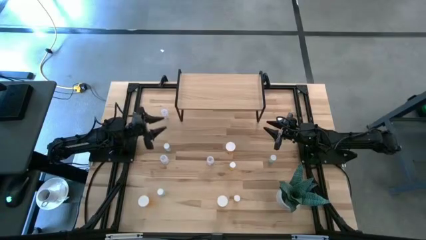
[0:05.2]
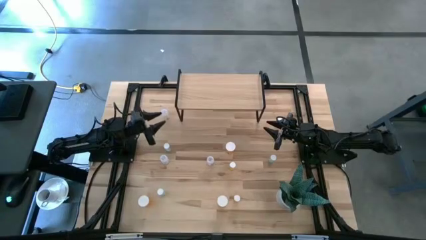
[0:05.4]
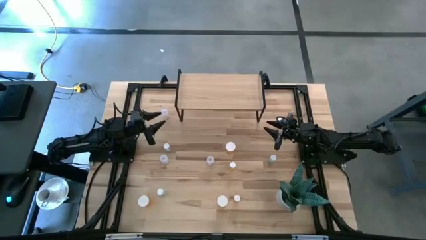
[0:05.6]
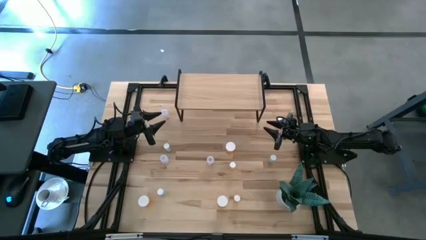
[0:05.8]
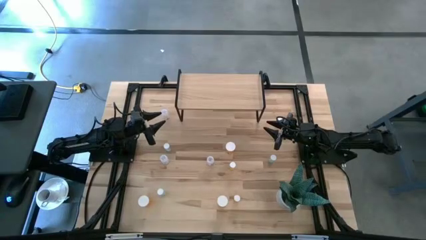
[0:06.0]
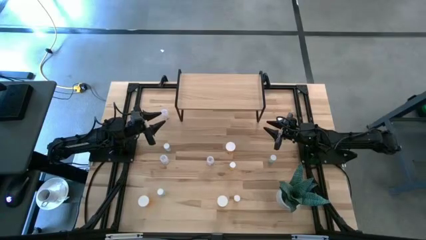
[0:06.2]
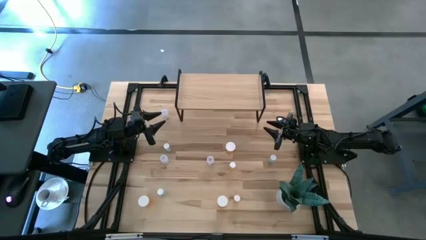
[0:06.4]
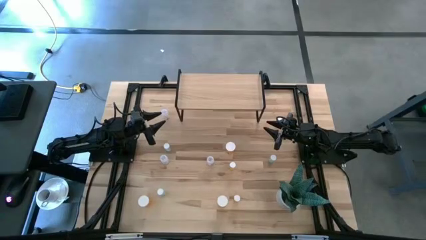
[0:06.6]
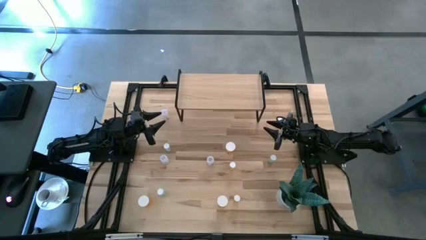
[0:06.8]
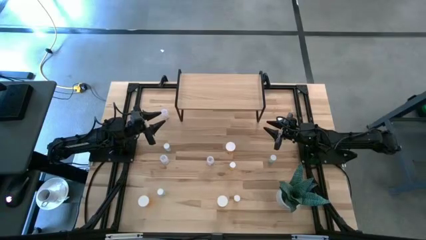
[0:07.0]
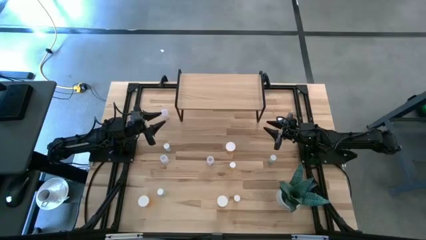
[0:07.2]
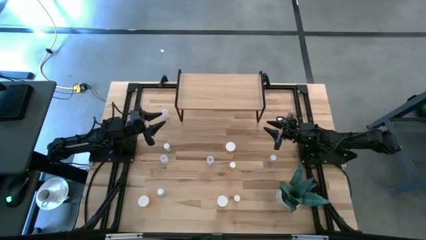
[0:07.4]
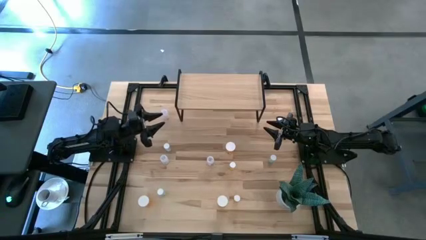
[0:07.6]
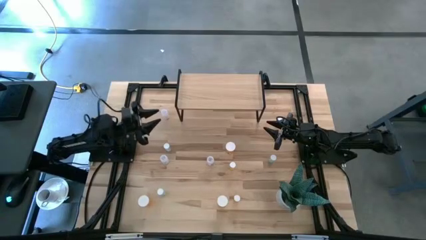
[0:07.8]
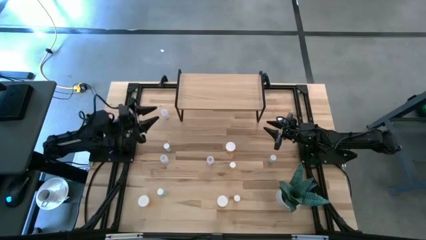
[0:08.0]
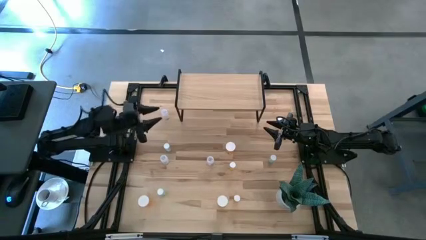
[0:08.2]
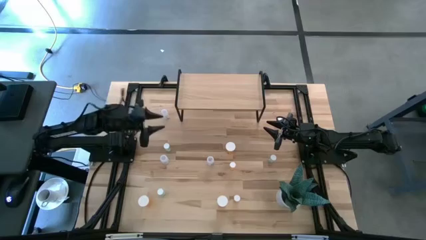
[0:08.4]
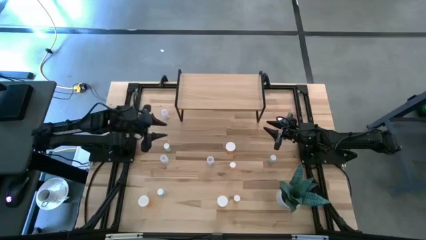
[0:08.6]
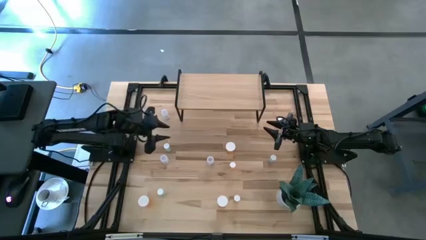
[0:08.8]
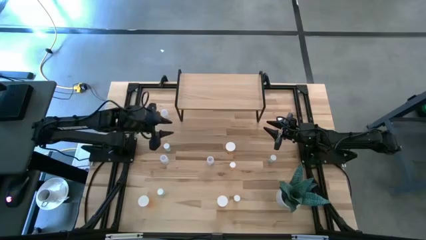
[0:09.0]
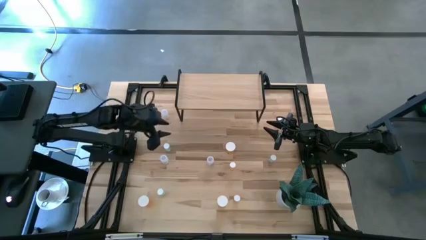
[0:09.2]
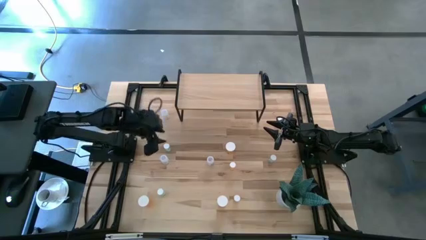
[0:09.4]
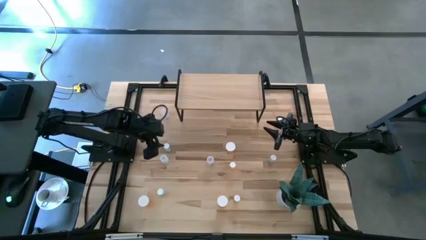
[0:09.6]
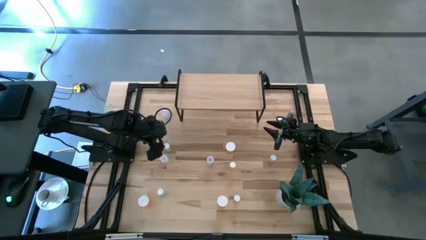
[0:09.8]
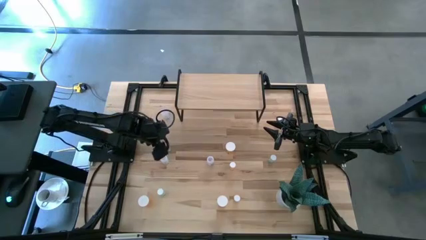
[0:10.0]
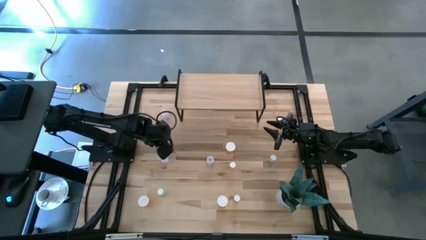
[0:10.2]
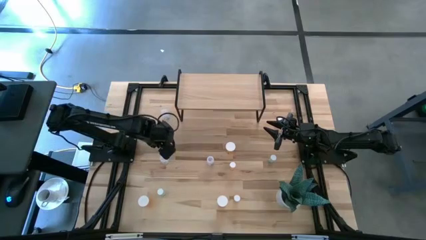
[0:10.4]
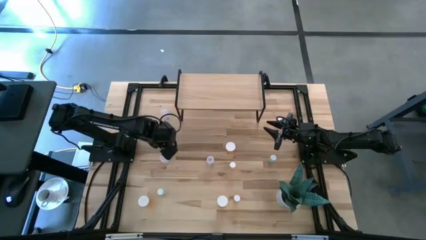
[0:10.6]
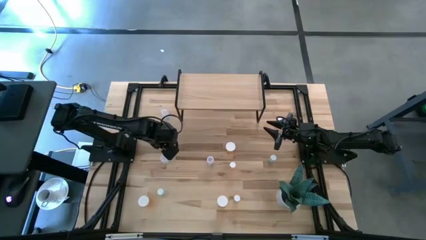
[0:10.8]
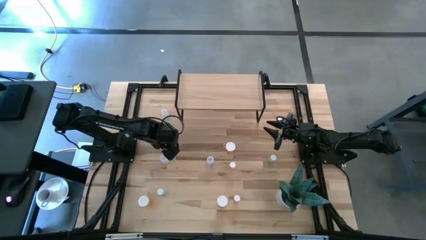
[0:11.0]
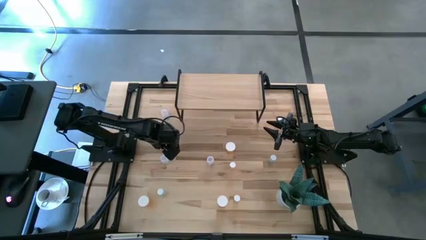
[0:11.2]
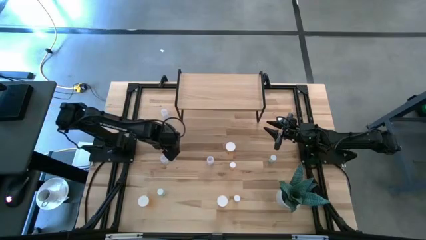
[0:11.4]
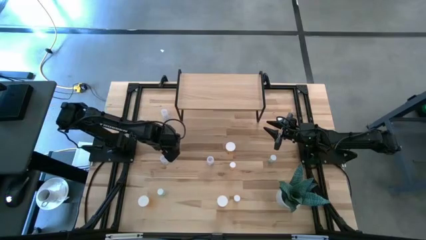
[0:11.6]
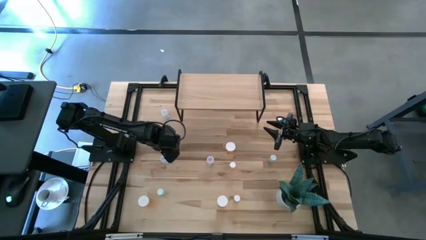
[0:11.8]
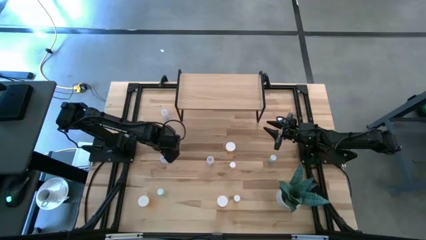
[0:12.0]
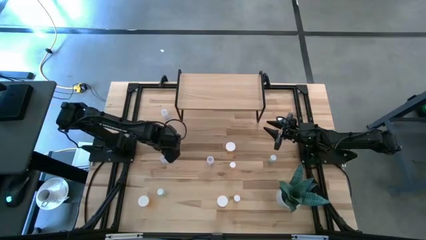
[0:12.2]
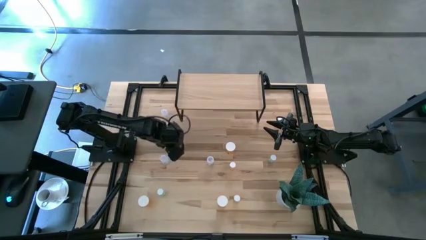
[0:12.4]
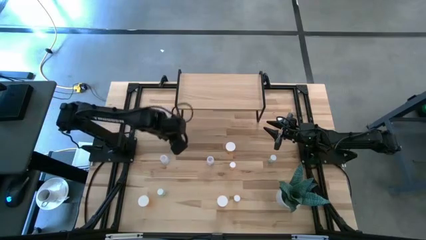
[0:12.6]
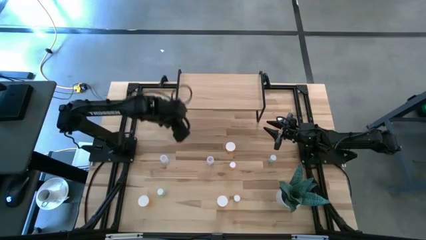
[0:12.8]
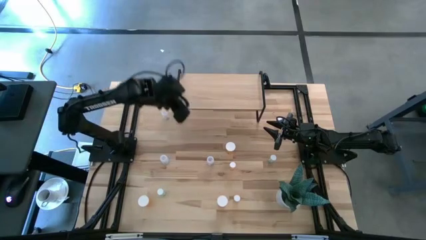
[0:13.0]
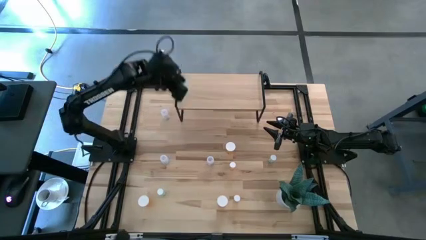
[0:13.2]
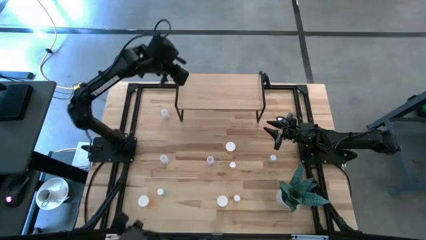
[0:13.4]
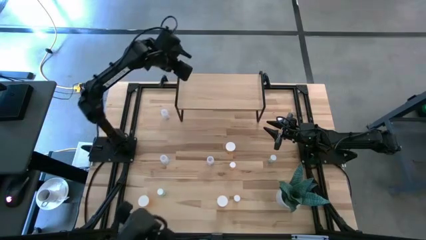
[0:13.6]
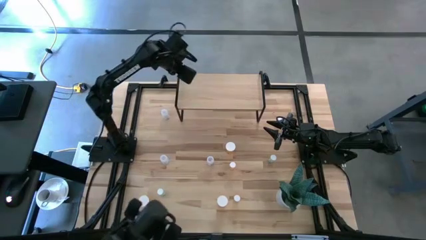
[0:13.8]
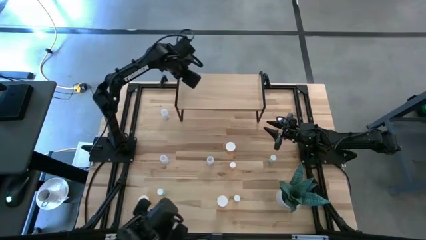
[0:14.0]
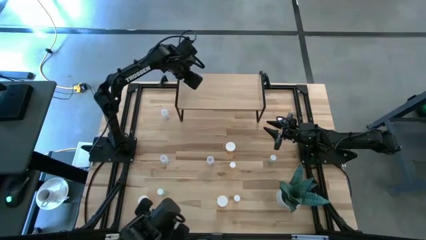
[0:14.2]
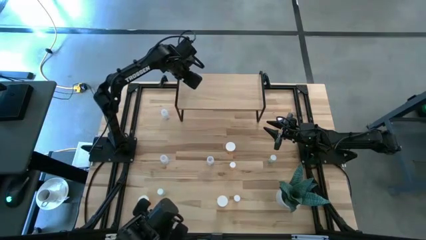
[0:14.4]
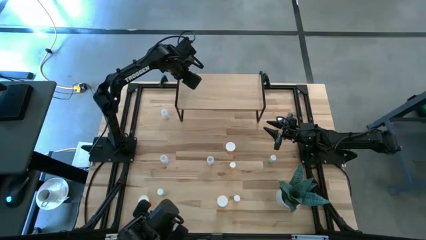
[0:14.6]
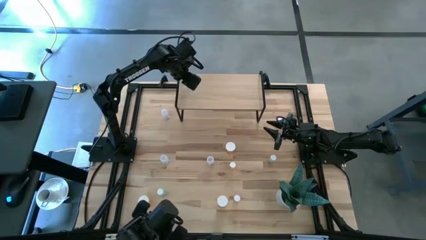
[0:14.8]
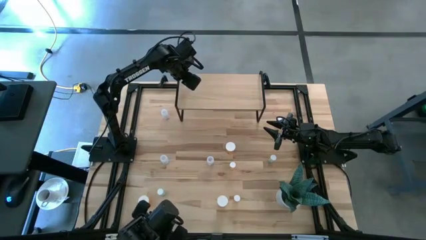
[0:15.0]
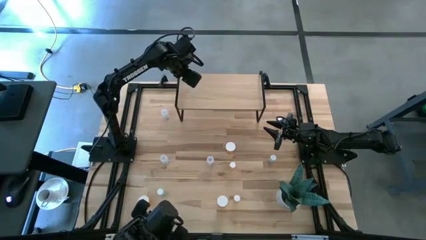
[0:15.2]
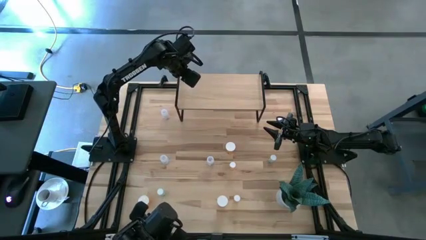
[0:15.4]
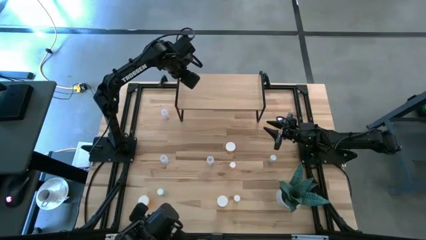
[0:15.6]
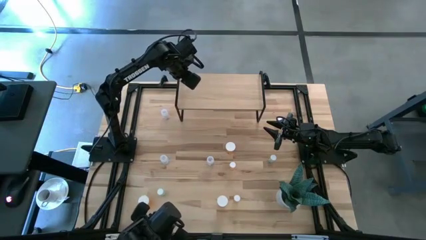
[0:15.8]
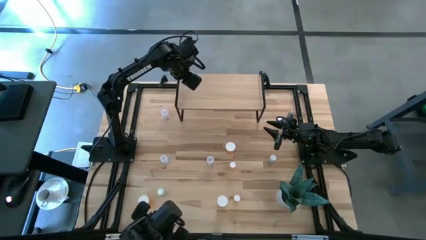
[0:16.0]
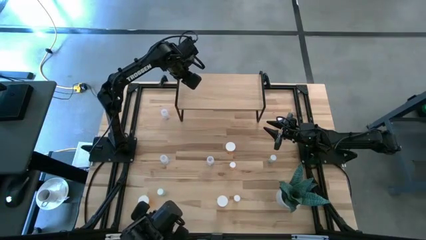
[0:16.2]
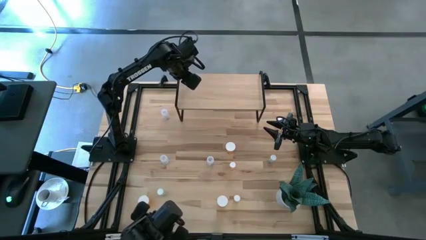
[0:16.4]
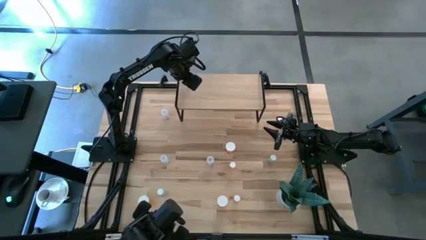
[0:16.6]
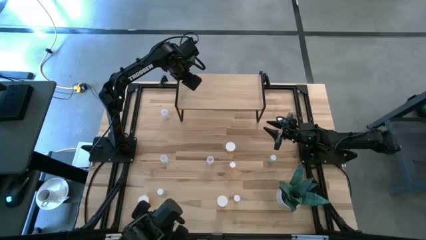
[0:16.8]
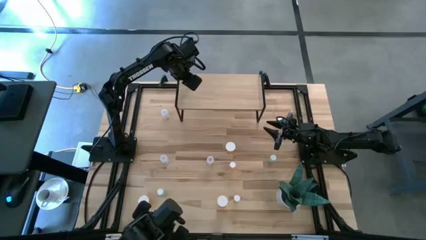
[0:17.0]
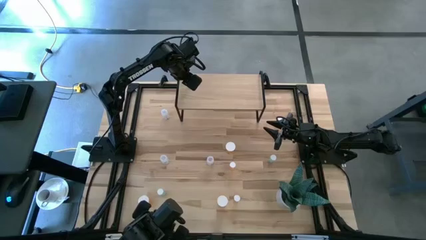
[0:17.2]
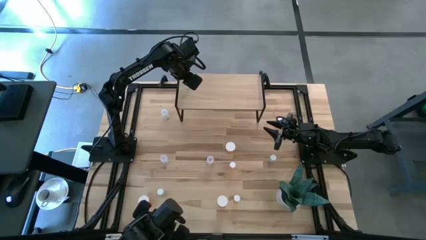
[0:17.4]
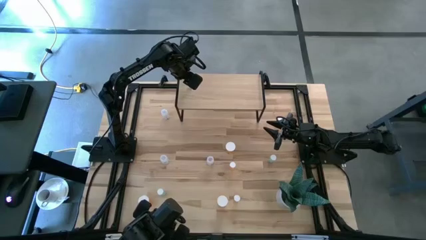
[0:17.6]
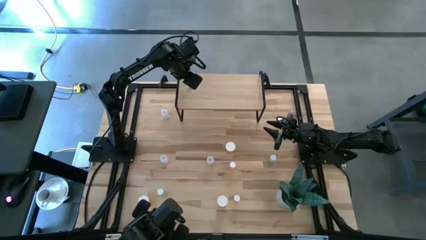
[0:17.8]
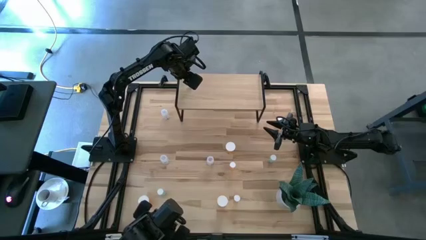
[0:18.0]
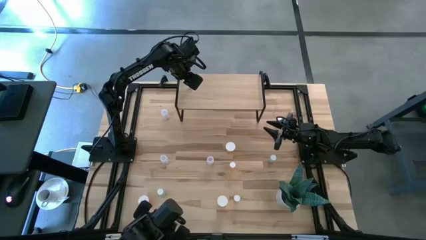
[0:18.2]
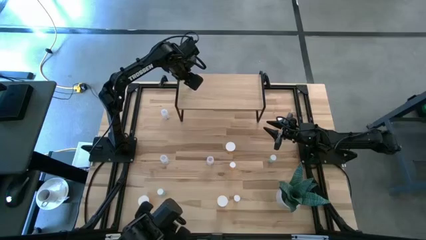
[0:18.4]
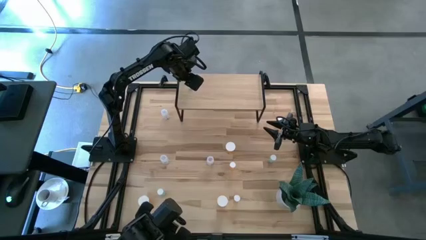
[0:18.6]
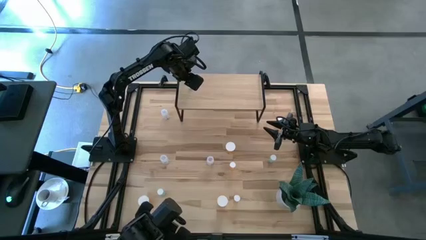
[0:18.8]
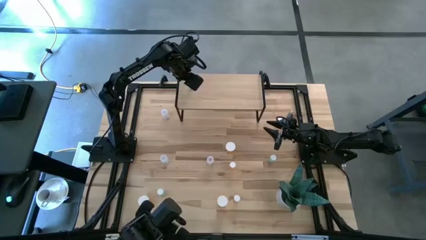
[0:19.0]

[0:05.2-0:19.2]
Task: Pick and place medicine bottles onto shelf by color
Put the top left blue pill bottle on the shelf

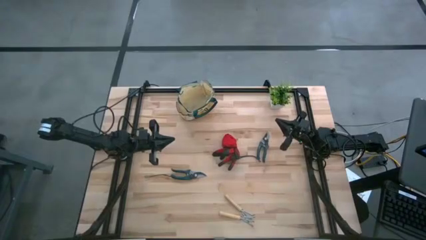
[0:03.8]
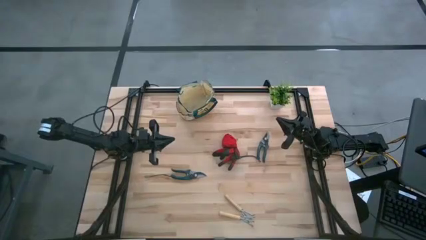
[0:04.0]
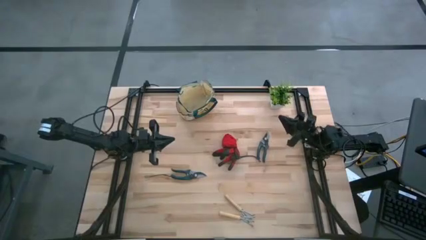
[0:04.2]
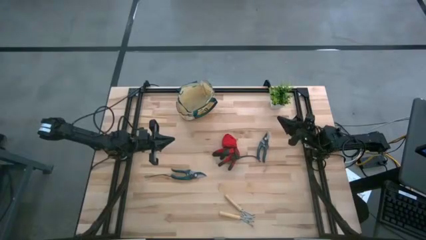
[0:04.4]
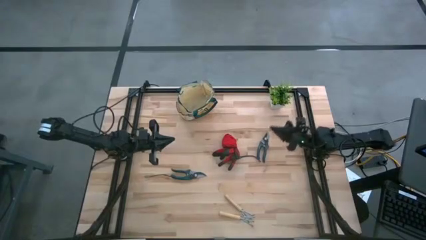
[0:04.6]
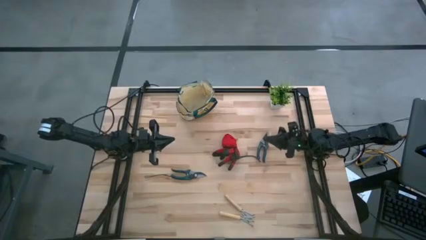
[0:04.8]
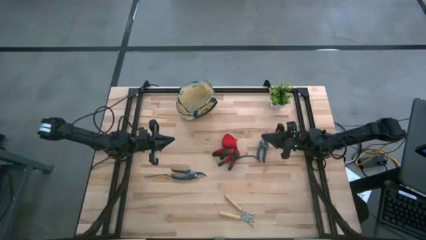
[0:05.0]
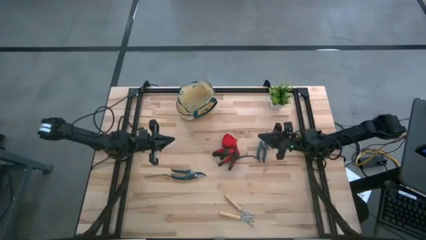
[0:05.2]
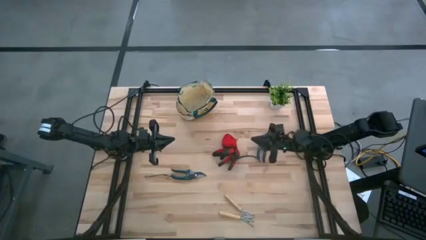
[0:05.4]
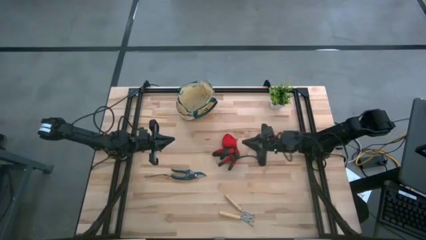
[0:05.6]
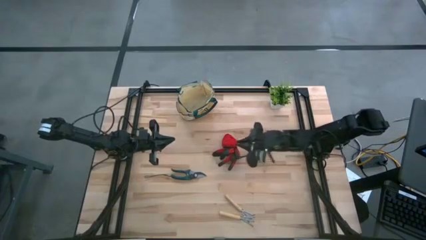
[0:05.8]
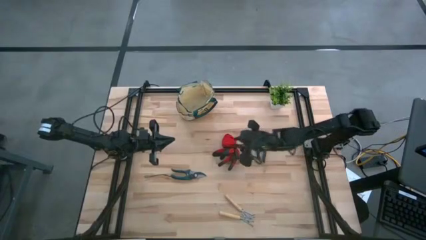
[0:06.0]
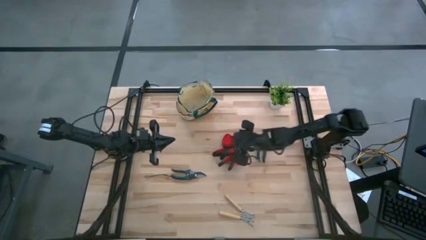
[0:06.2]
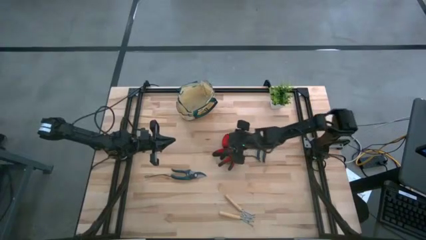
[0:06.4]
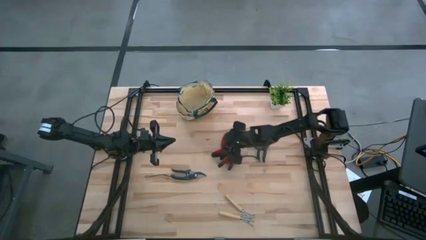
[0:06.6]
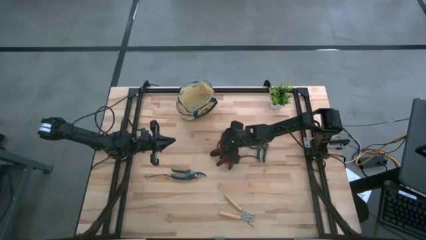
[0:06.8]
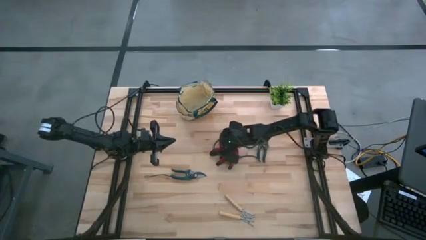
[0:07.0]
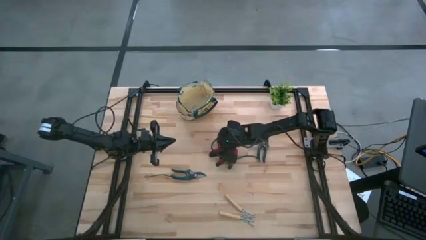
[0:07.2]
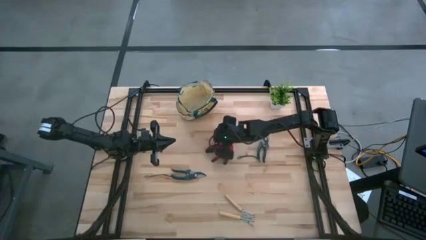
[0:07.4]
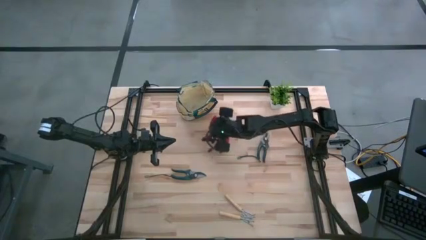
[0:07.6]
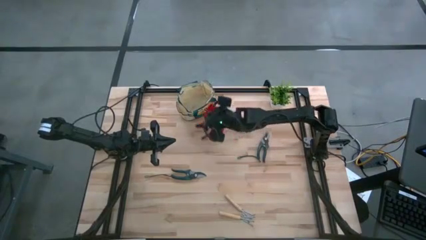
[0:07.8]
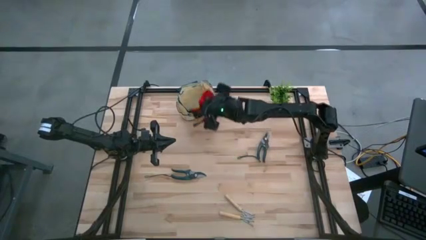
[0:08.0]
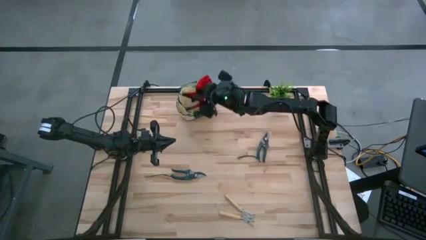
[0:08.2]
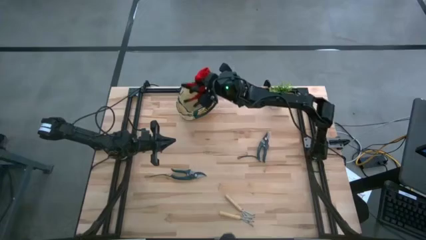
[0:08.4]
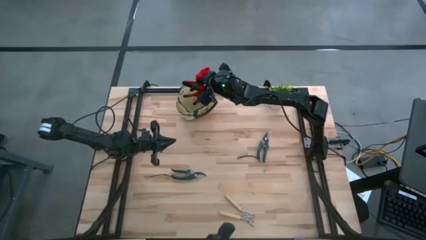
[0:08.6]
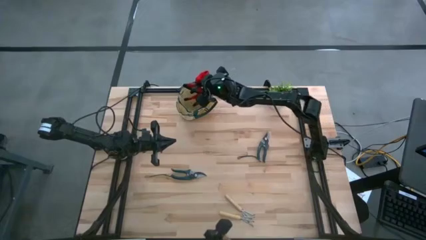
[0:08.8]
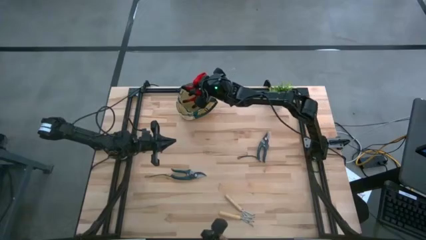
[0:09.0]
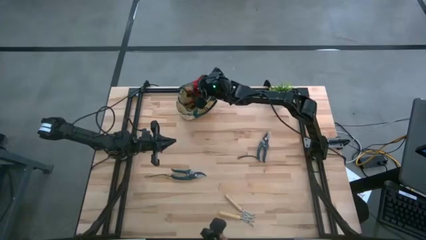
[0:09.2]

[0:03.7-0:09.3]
Task: Pick & Place Garden tools in Gardening bag
Put the red gloves into the brown gardening bag
